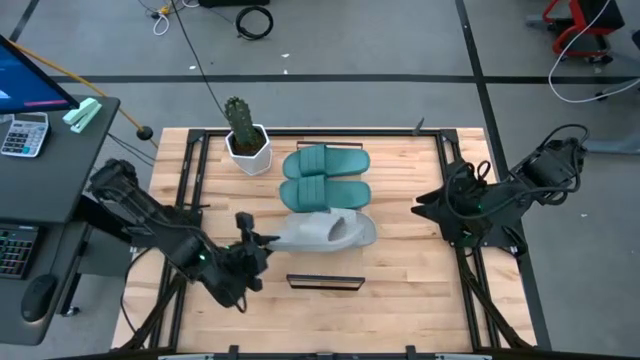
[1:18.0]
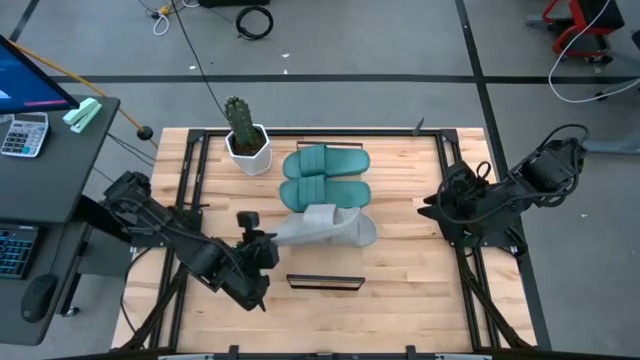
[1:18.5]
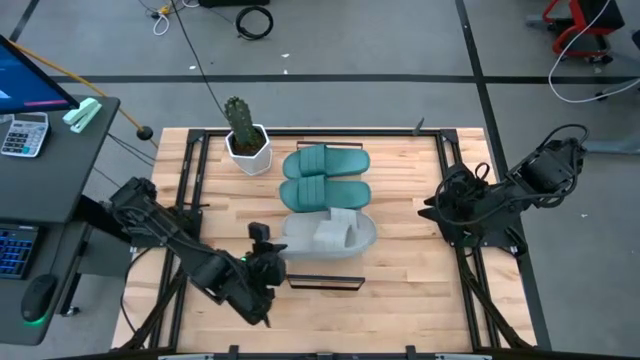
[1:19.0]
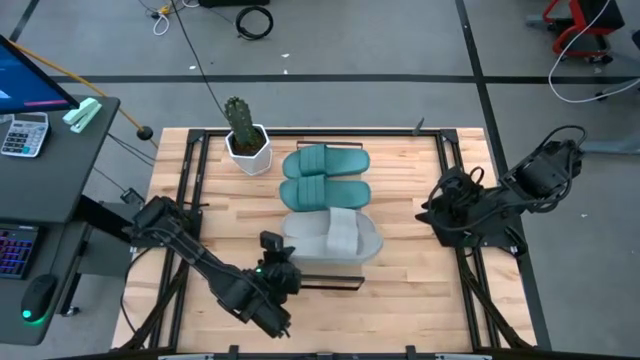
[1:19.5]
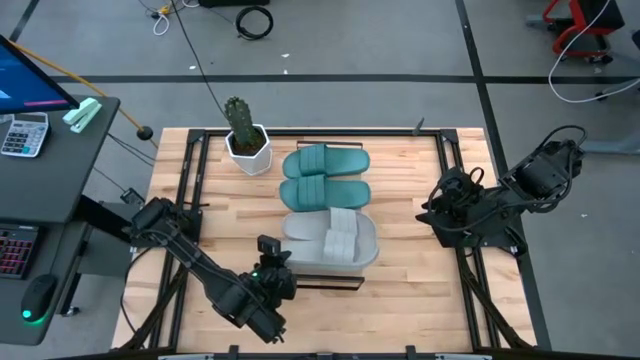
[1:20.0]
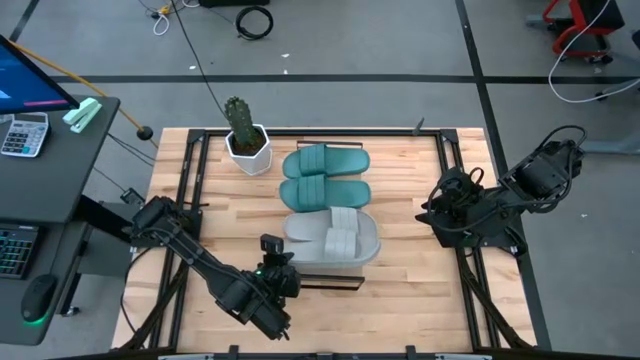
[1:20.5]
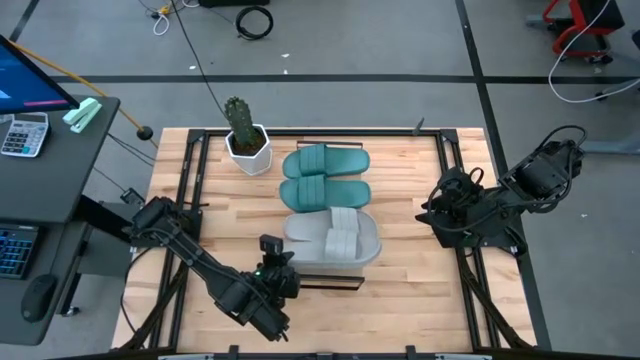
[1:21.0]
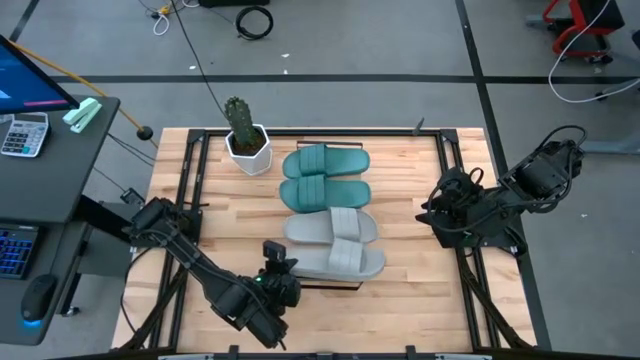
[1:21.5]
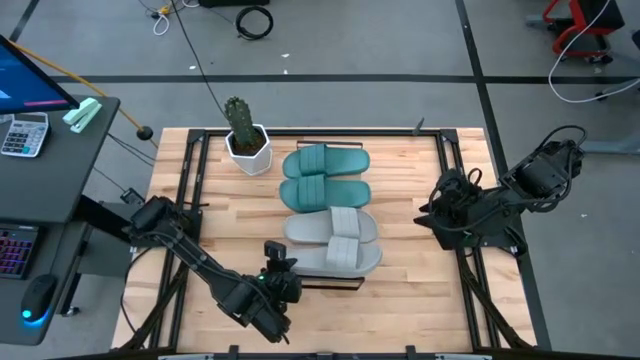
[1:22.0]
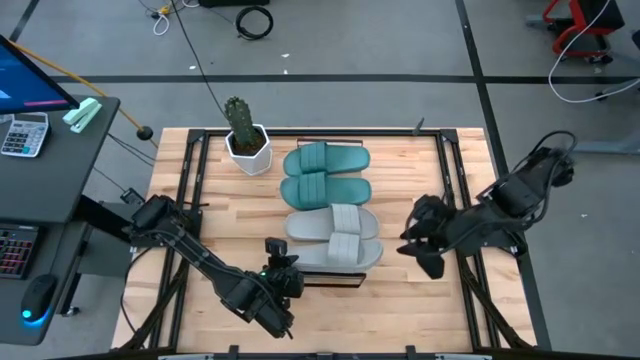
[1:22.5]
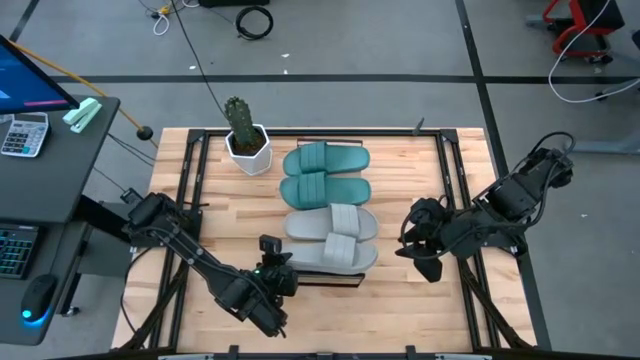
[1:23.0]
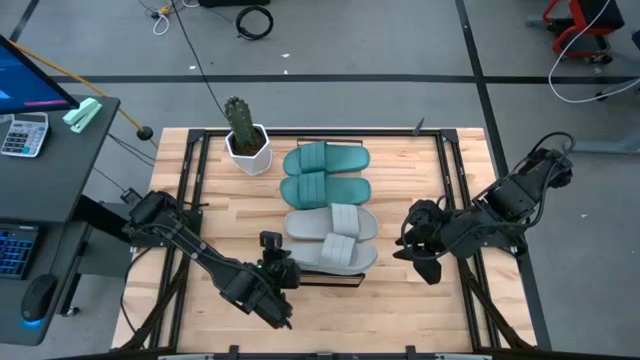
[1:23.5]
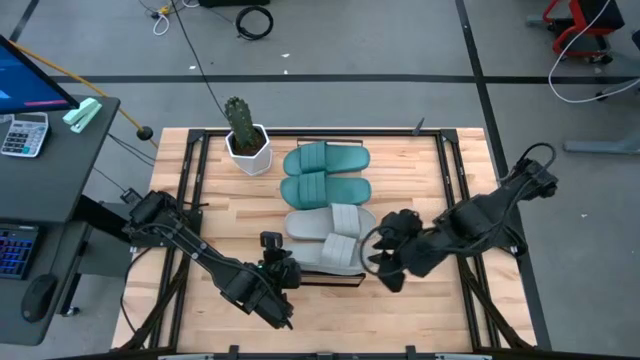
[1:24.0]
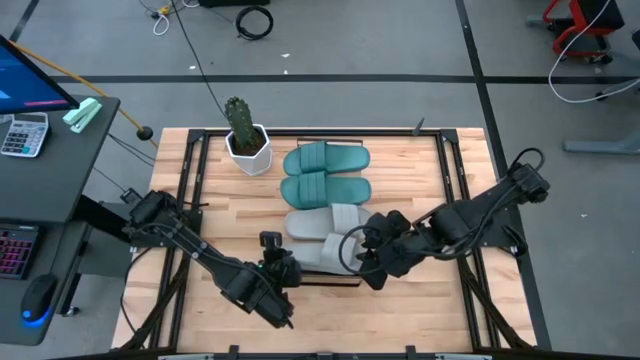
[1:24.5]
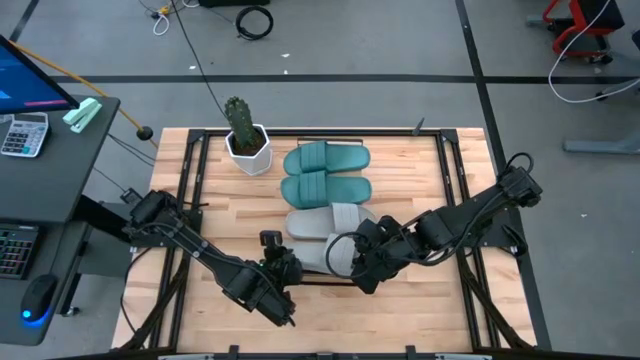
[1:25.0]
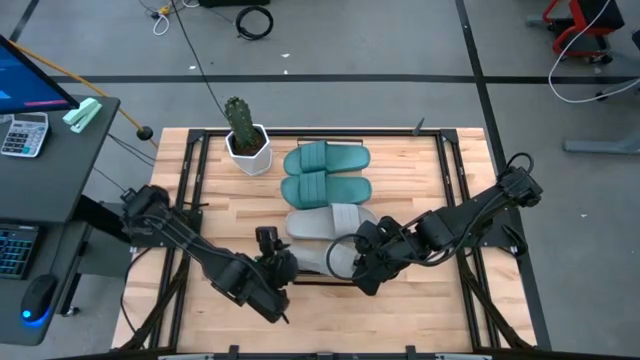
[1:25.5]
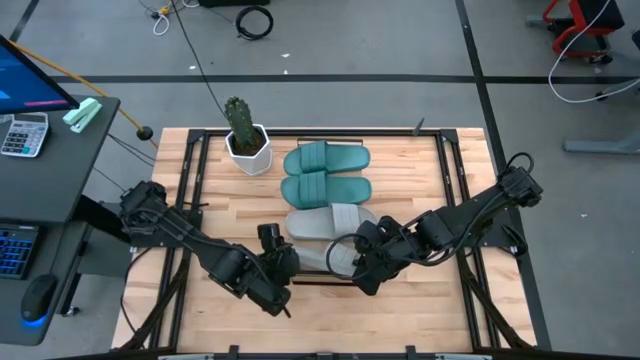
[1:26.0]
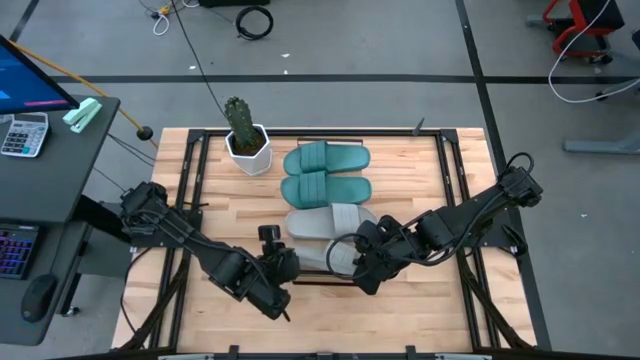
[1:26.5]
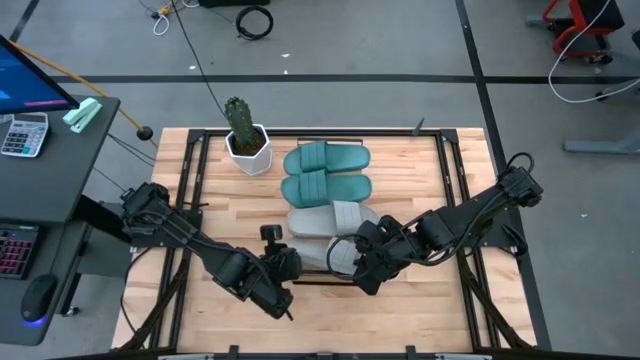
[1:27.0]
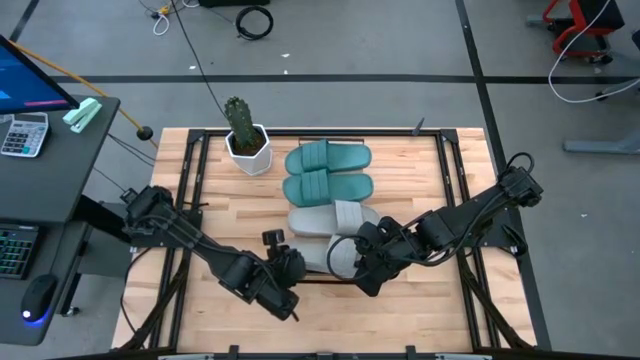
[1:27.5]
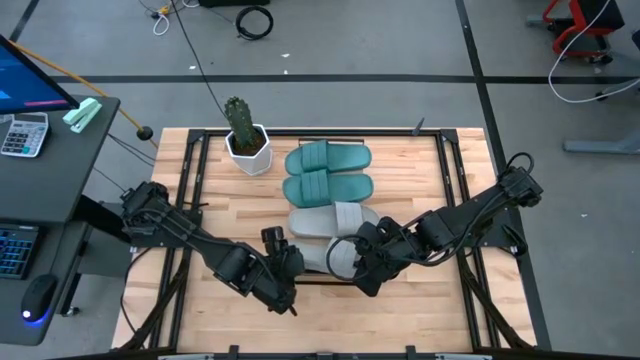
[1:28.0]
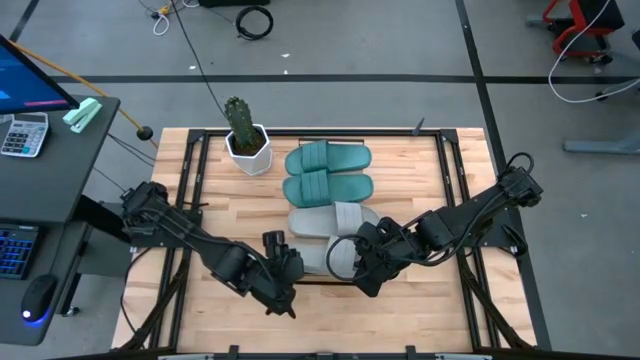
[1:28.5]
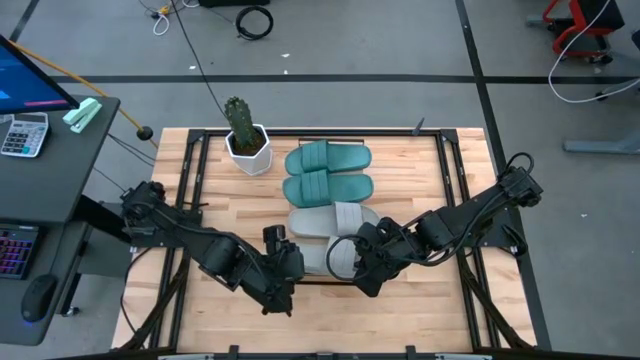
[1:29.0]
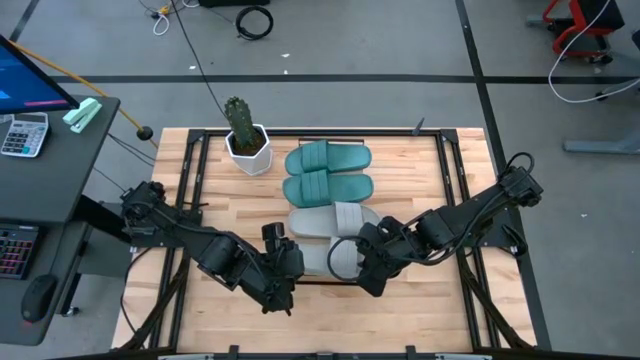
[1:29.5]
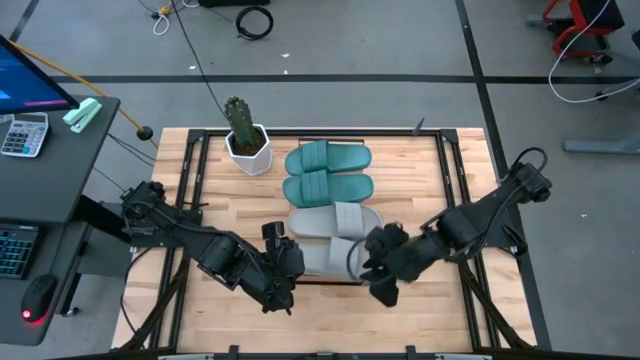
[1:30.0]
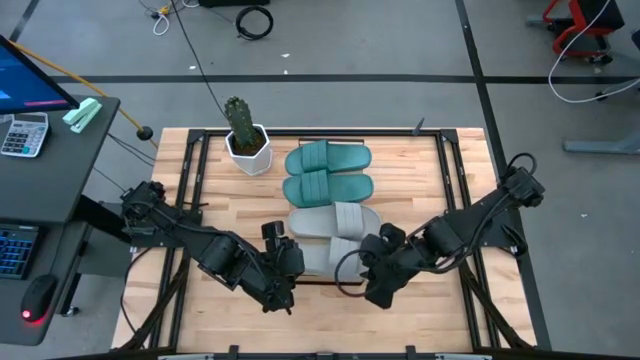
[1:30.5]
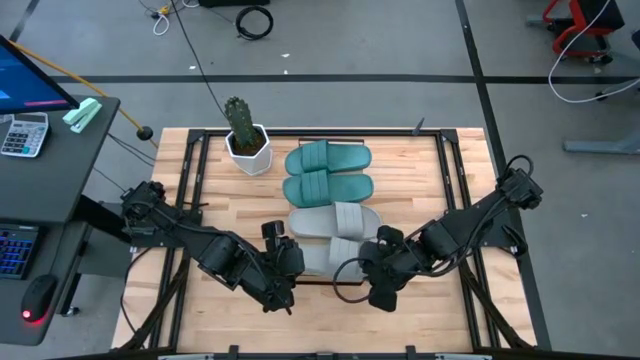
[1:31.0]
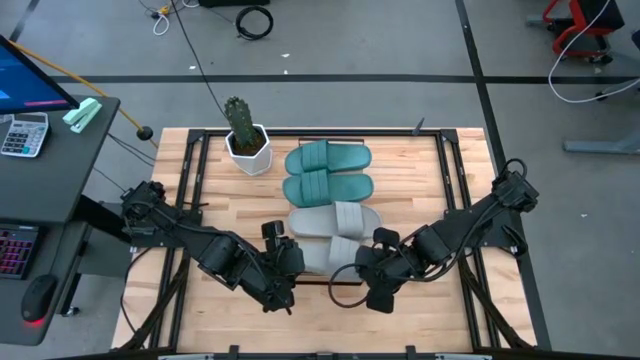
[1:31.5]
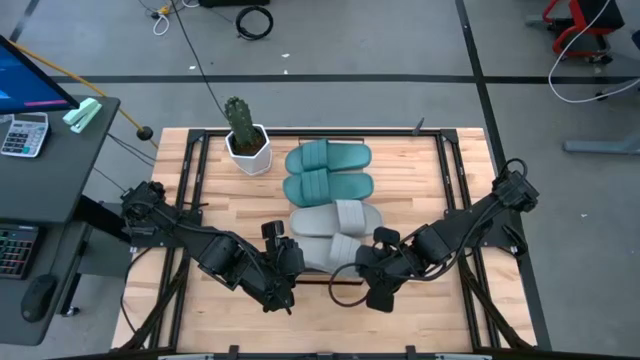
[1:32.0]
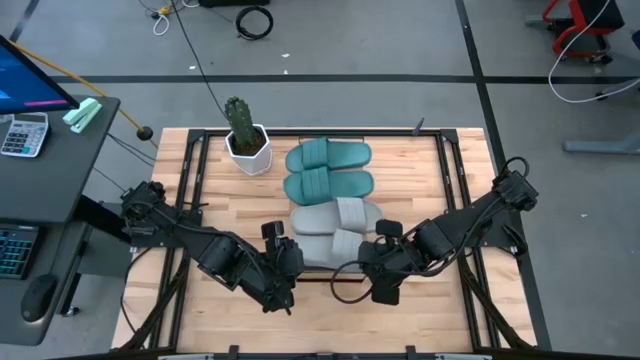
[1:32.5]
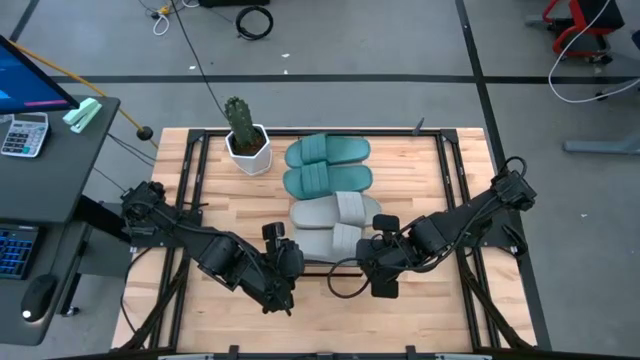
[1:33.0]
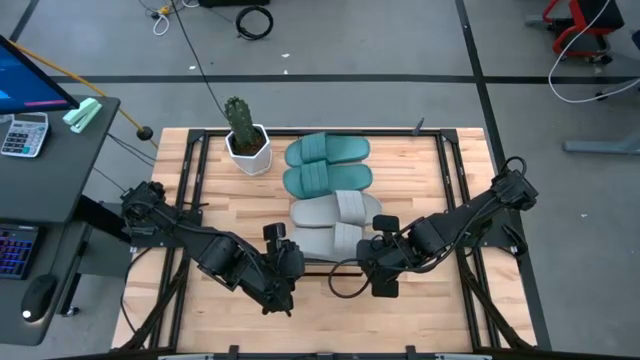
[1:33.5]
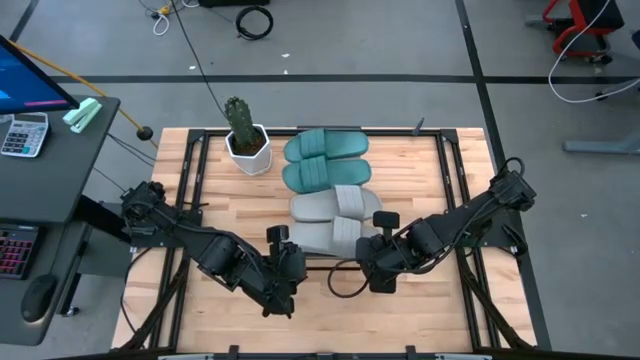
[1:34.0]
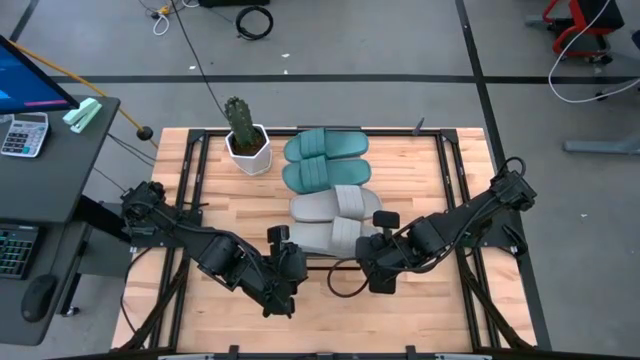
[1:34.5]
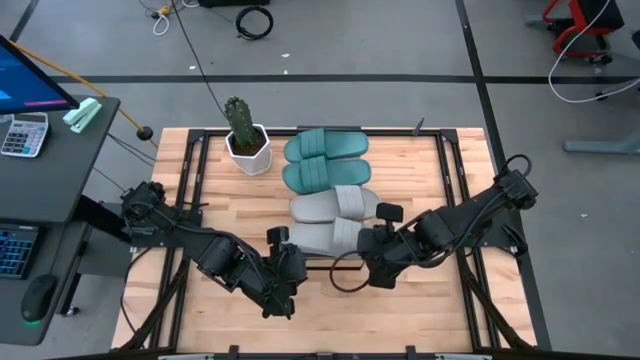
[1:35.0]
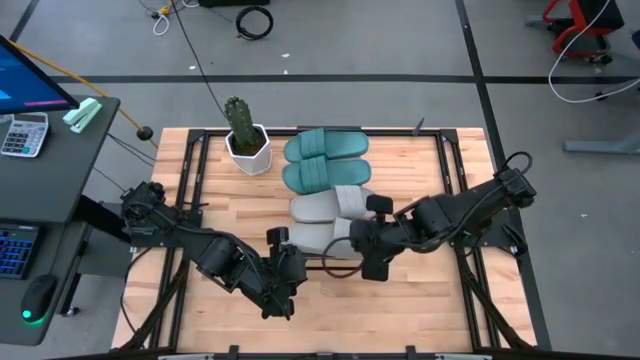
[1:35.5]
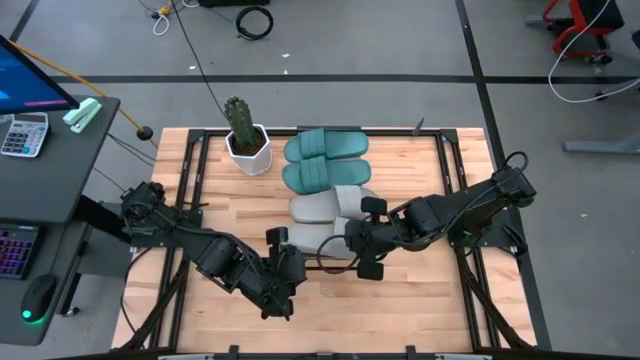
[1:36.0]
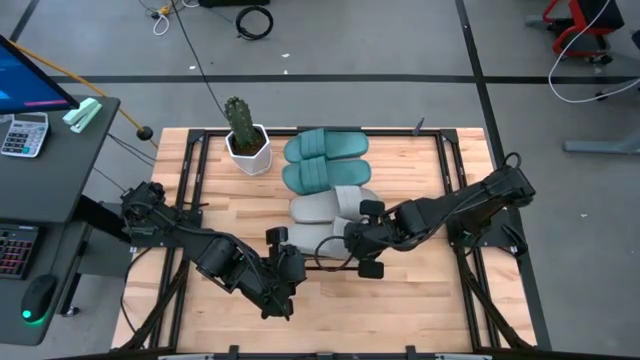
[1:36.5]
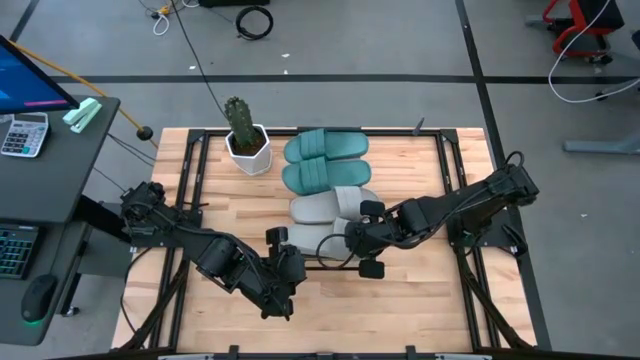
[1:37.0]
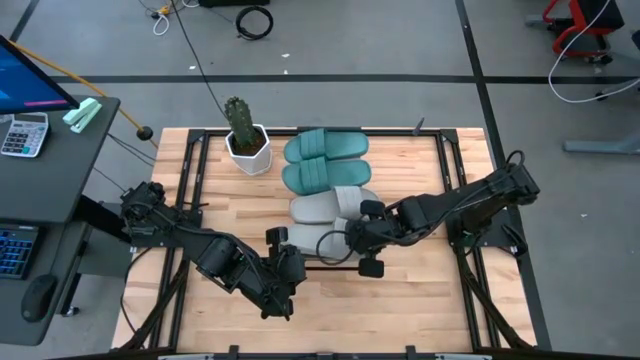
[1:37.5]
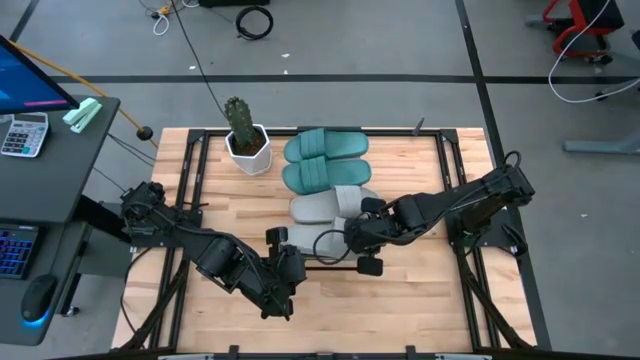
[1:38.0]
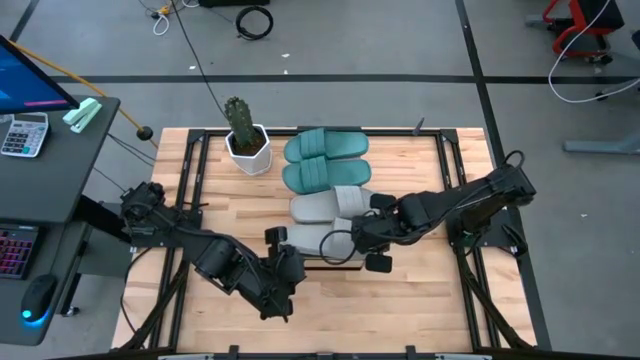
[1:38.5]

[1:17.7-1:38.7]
Task: Pick and place slides into the shelf
Put the gray slide on the shelf

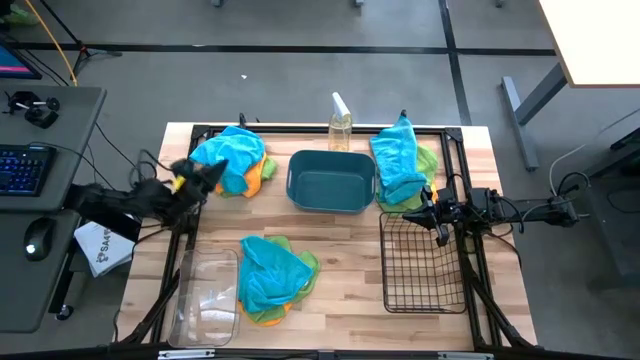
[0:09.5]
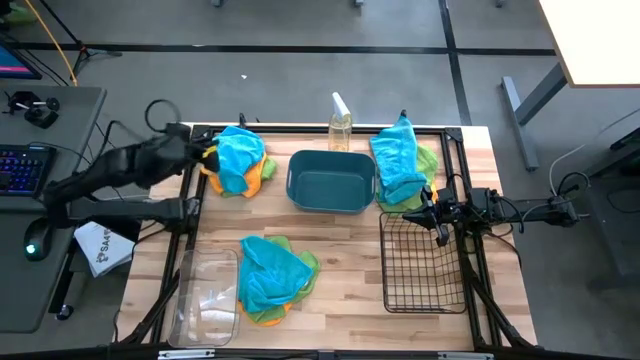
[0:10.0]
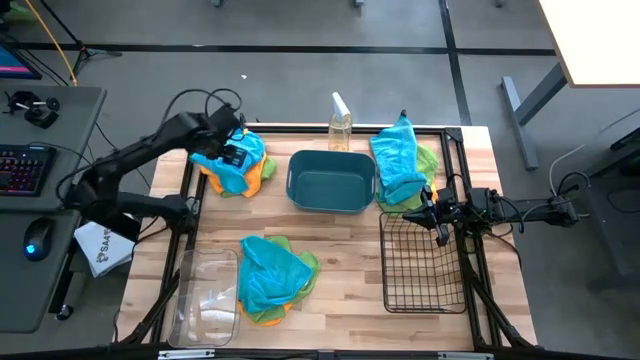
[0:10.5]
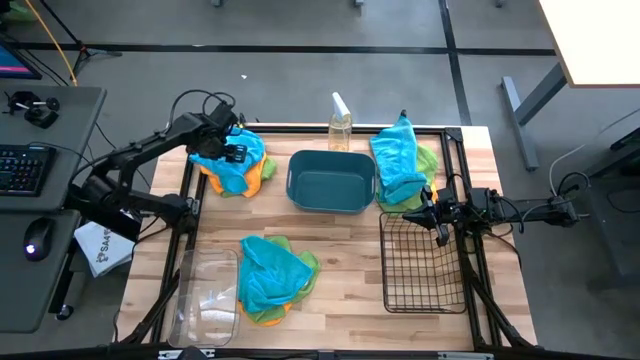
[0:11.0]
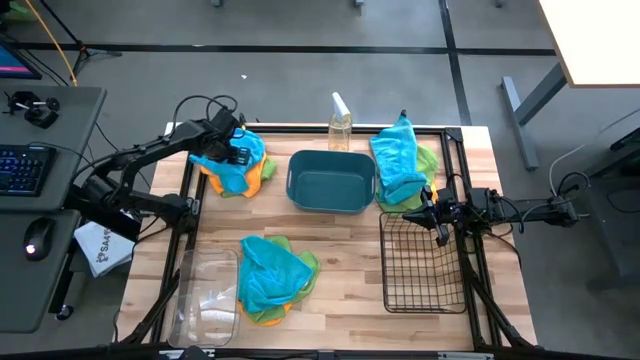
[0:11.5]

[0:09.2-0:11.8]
Task: Sort microfiber towel by color & place in baskets
Put the top left blue towel into the blue bin
